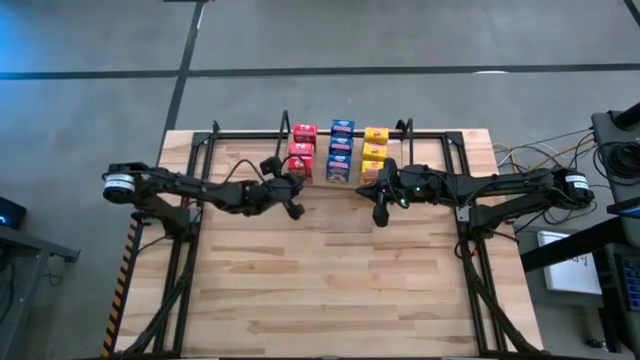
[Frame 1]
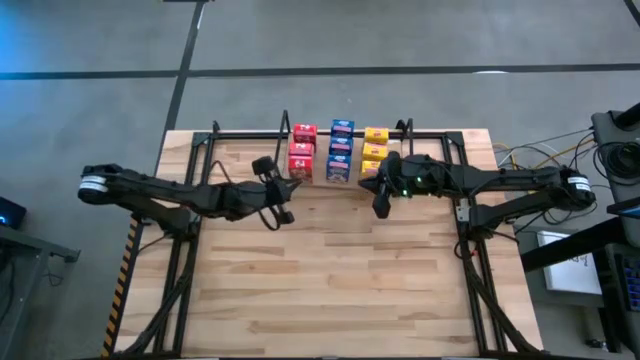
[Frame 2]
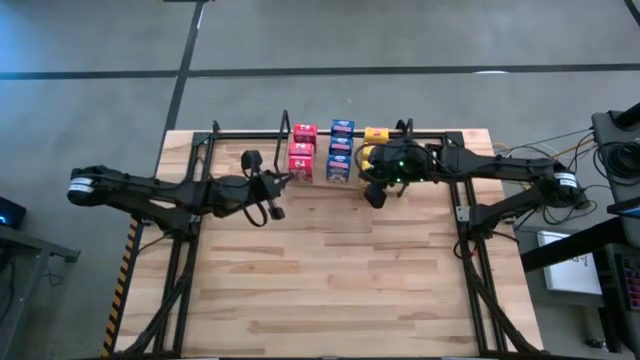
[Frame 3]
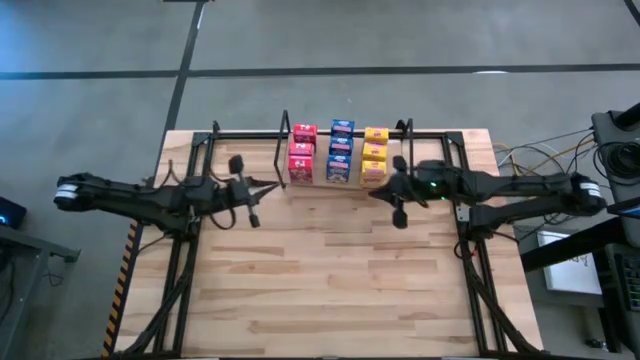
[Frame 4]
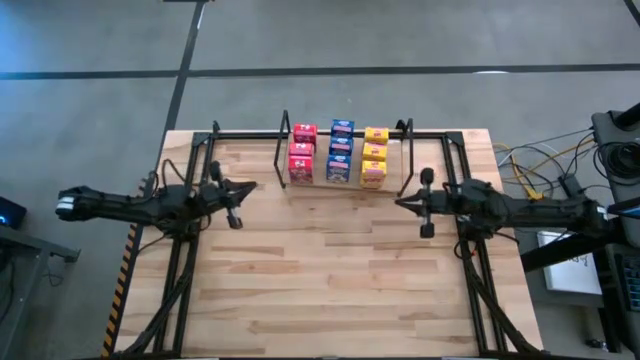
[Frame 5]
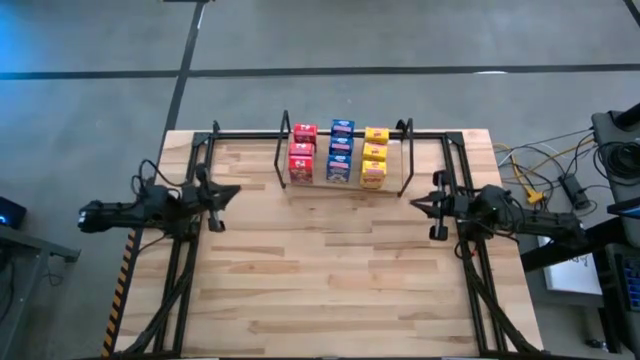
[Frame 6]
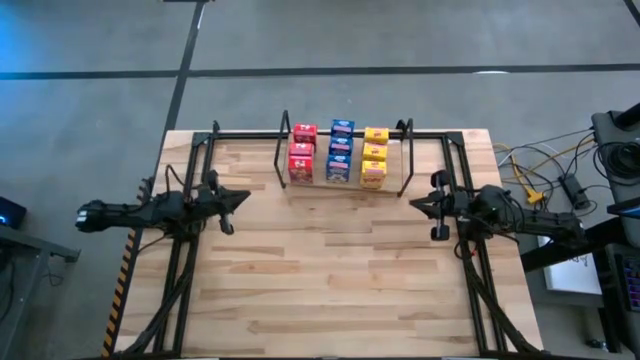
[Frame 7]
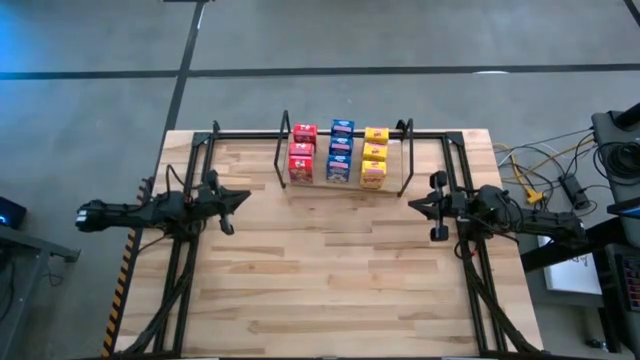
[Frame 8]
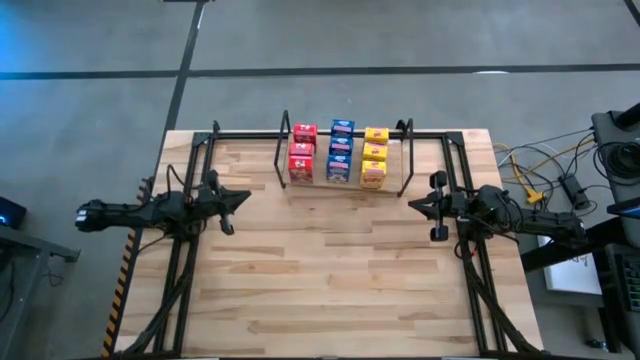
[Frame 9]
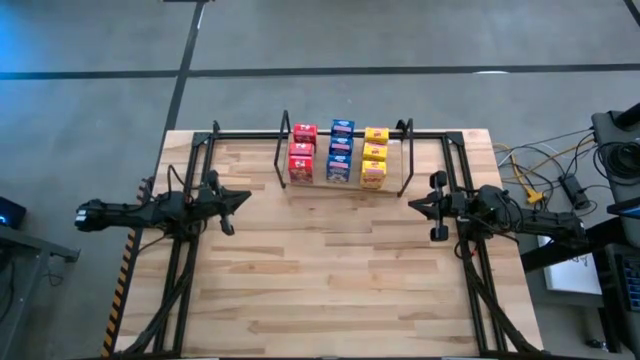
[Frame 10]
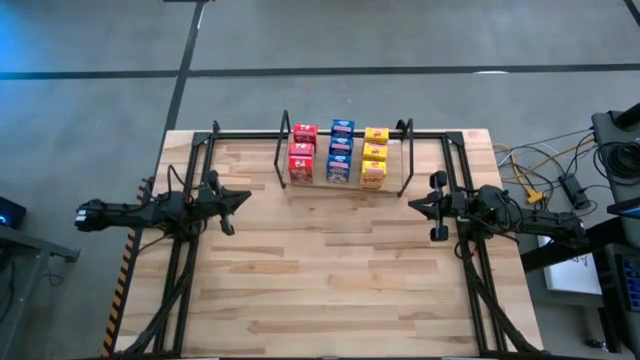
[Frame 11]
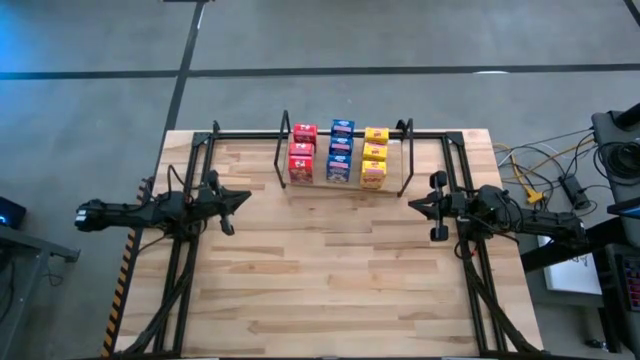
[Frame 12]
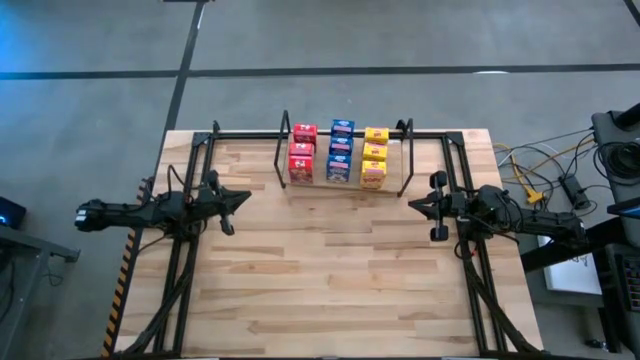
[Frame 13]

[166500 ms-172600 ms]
Task: Stack cereal on shelf
Return to Home Position

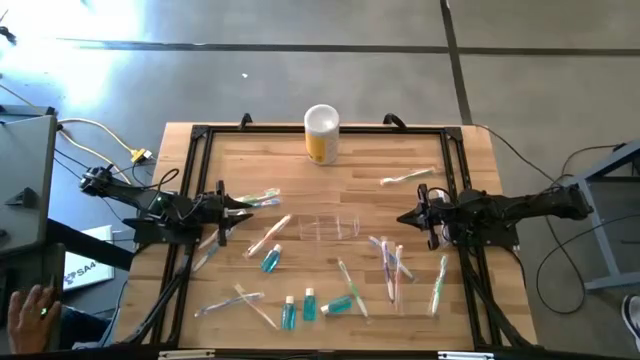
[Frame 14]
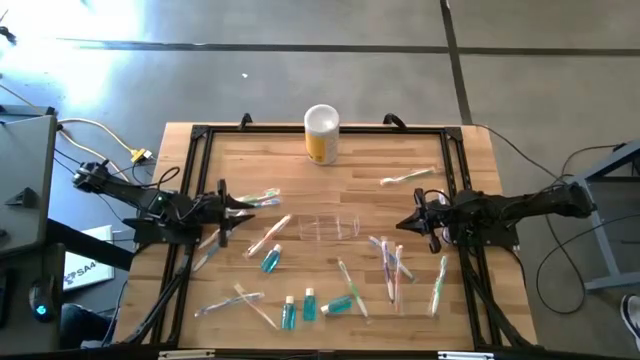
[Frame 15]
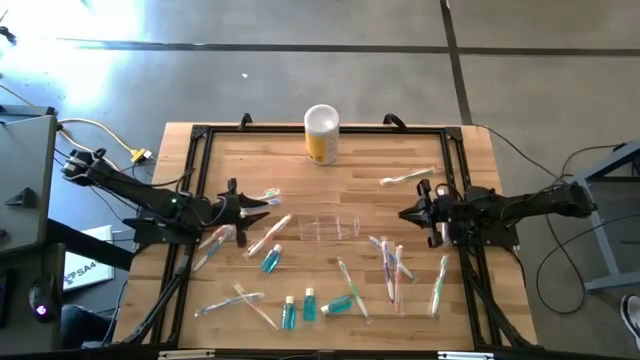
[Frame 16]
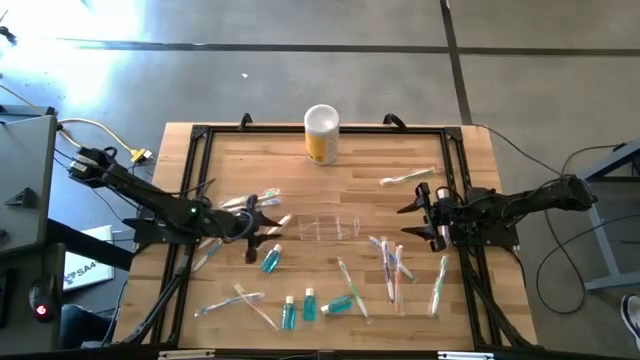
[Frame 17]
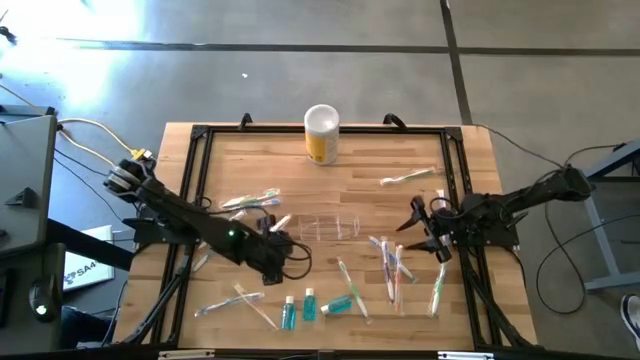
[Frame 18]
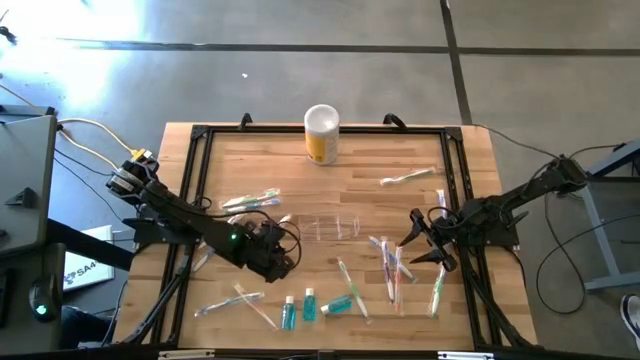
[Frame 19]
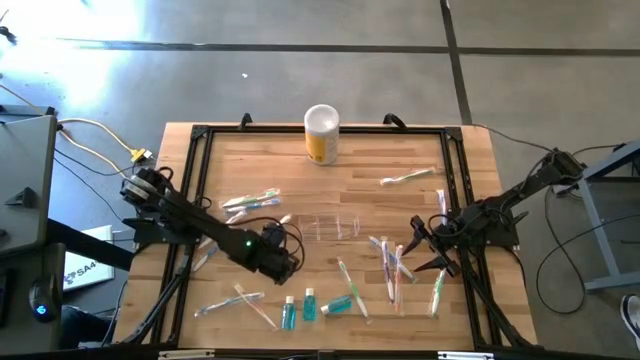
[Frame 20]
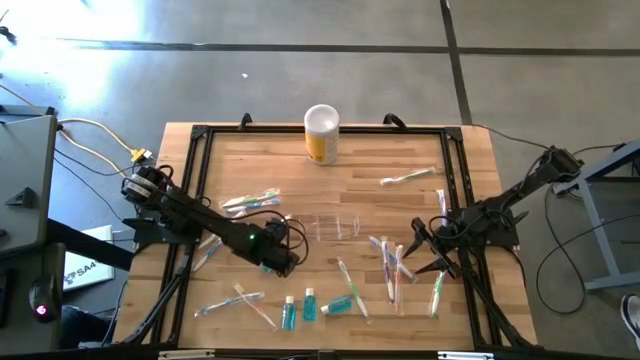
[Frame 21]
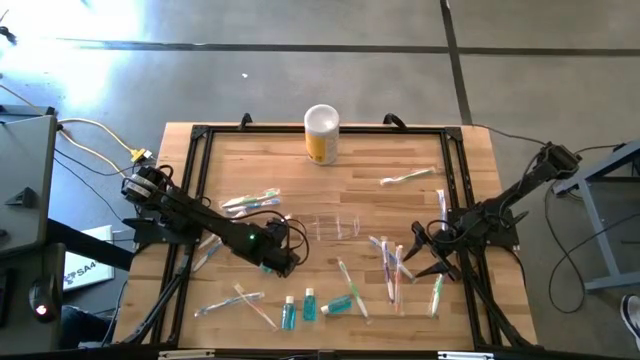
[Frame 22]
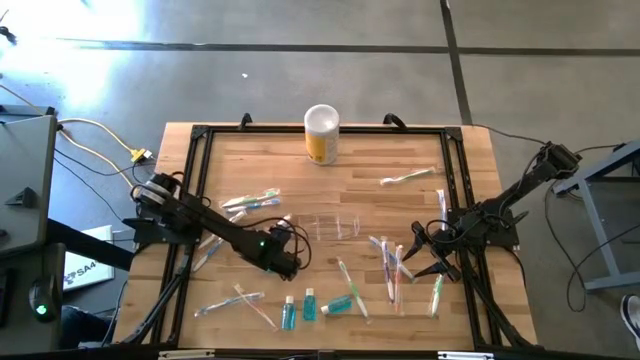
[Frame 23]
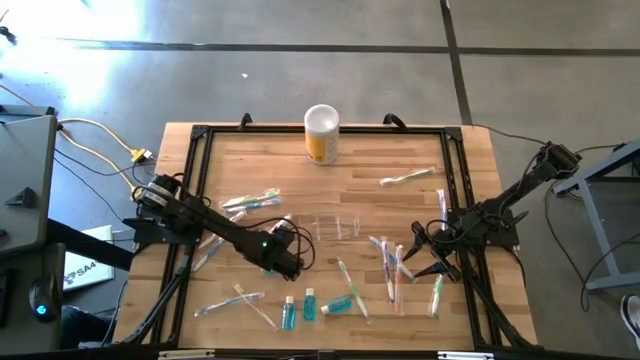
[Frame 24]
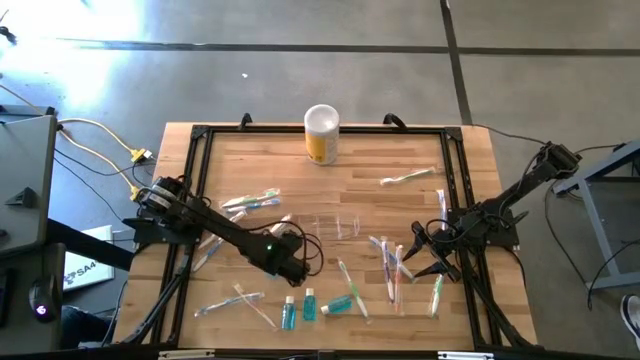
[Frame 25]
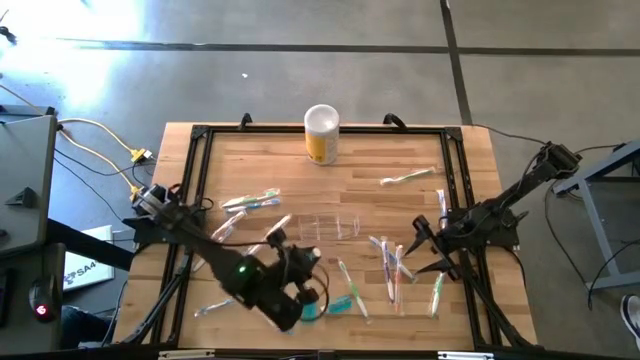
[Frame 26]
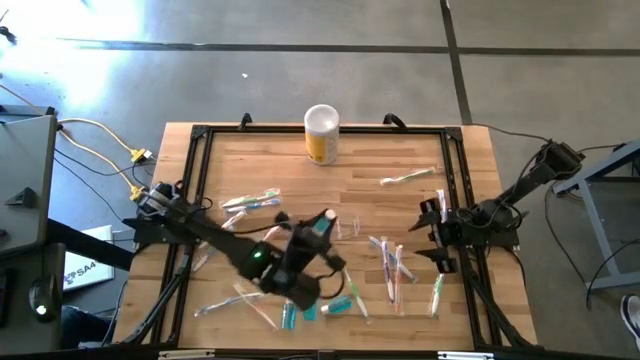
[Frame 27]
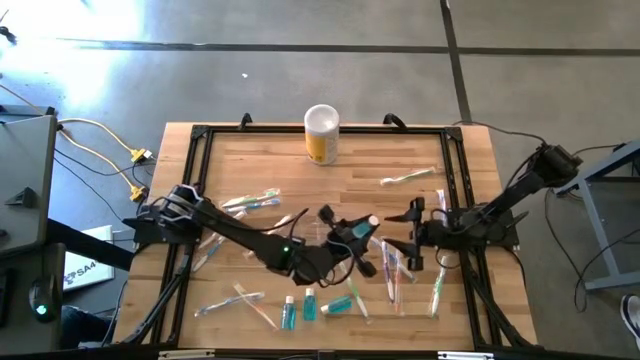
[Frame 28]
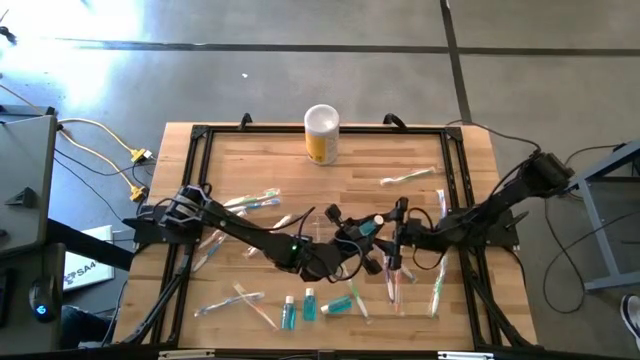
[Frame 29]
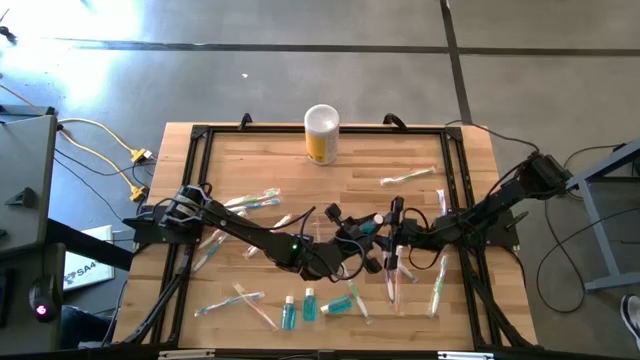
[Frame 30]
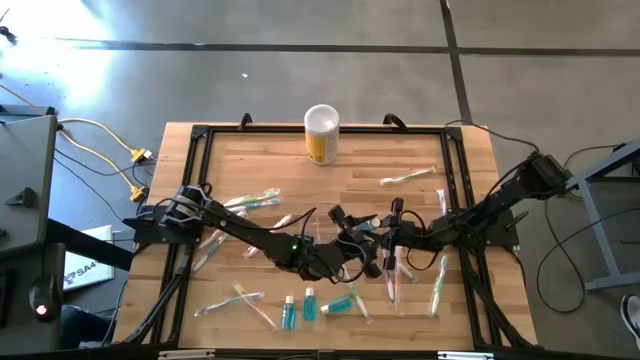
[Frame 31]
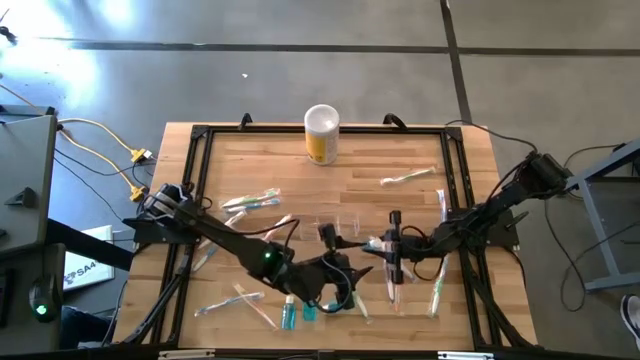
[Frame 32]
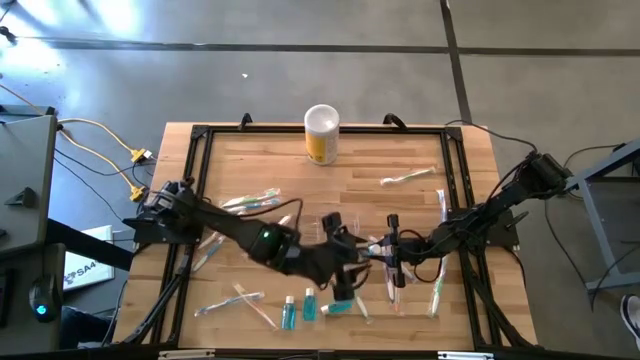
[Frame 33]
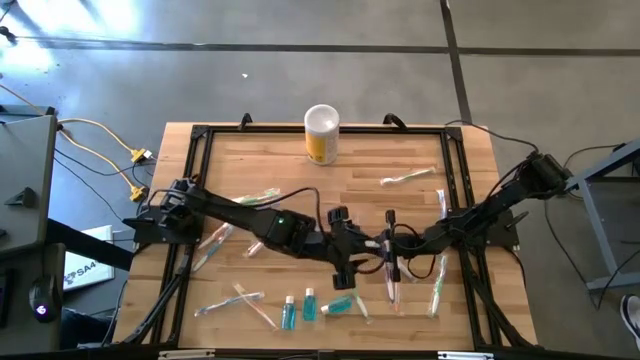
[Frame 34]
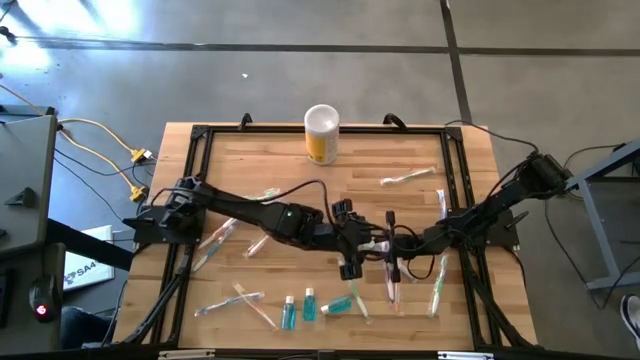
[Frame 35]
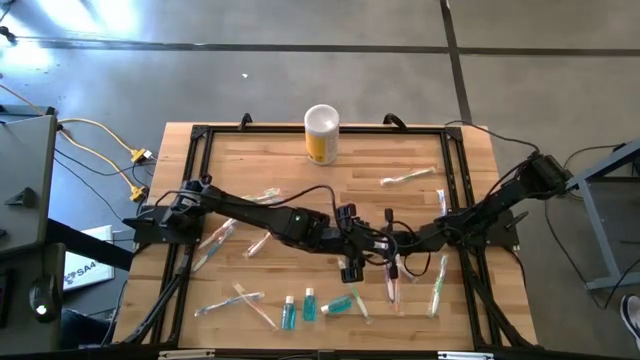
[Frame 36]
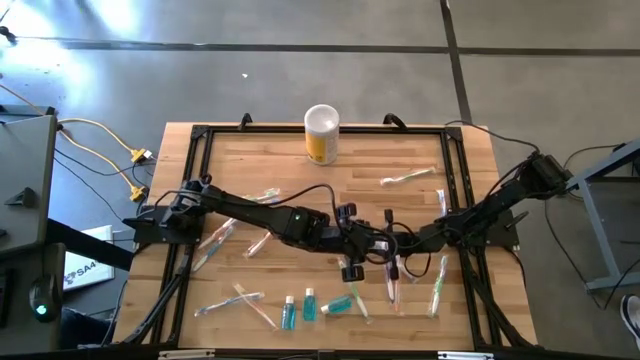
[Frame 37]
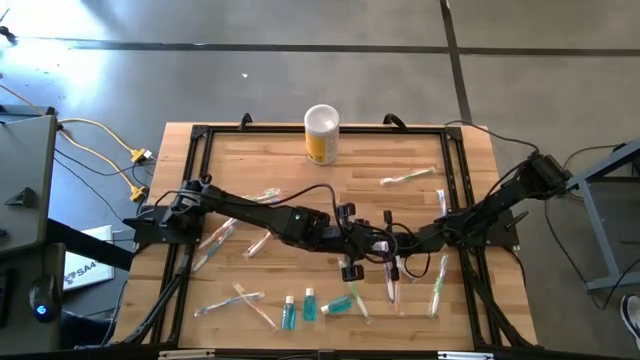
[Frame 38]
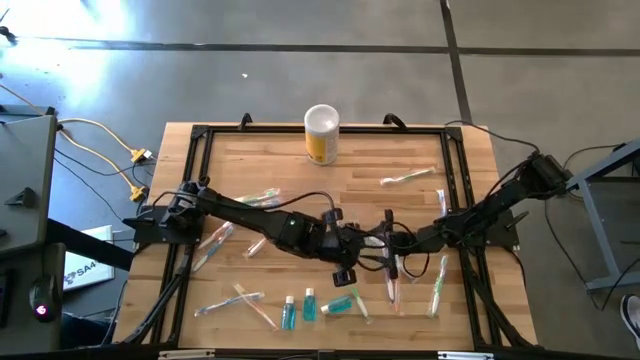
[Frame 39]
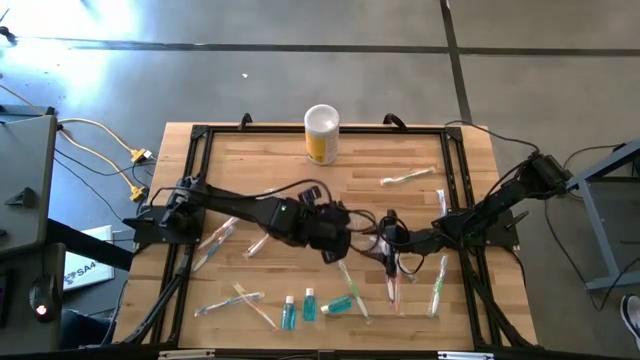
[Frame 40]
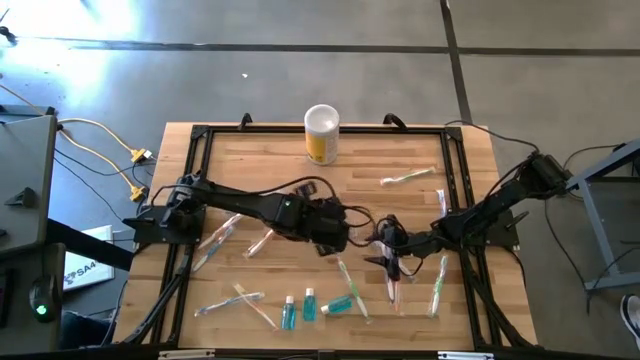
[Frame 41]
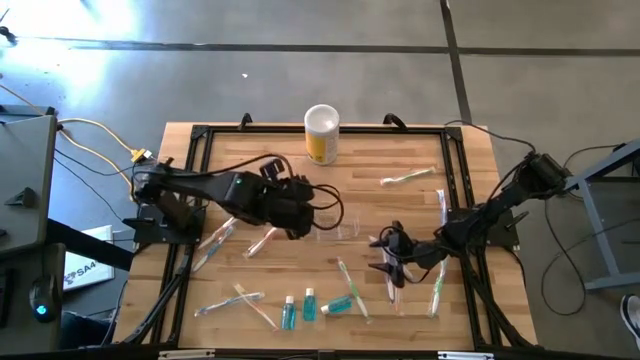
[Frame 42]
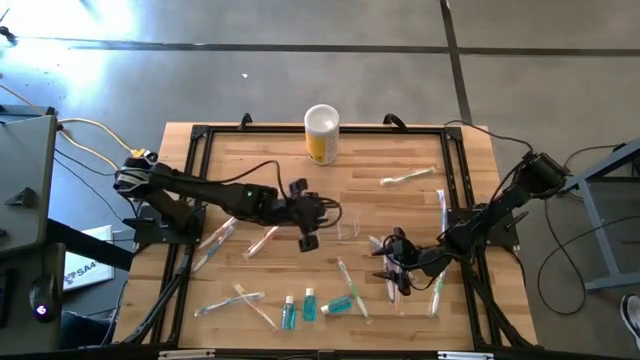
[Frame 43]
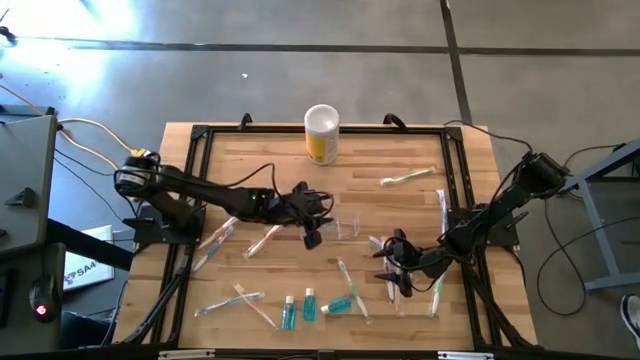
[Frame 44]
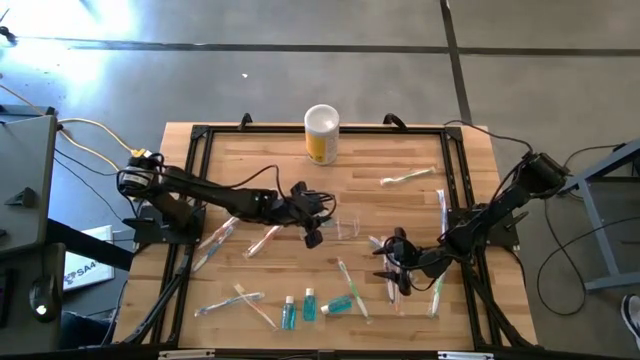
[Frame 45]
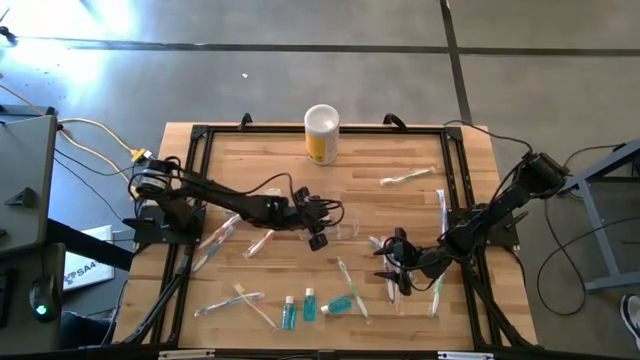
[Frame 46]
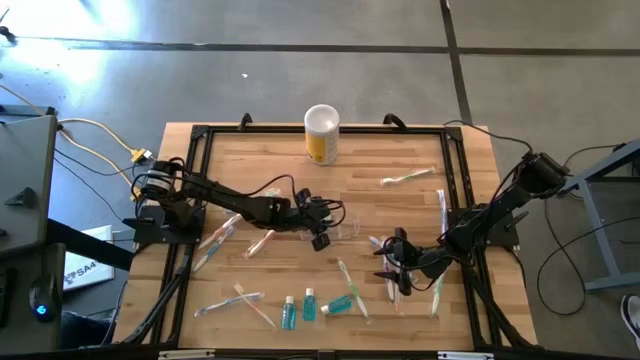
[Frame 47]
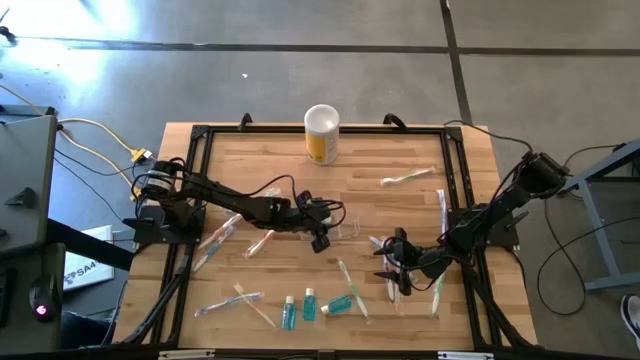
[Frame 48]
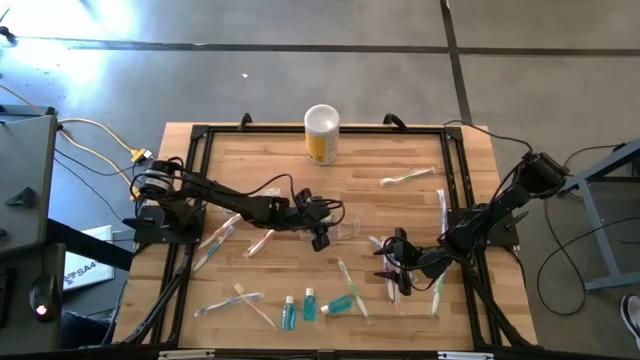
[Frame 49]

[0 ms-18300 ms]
Task: Pick & Place toothbrushing station
Put the blue mouthwash into the middle part of the transparent organizer
